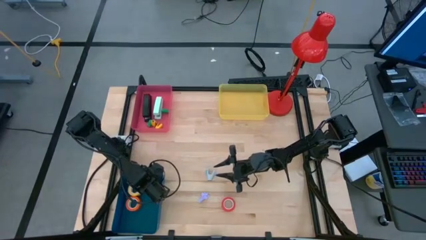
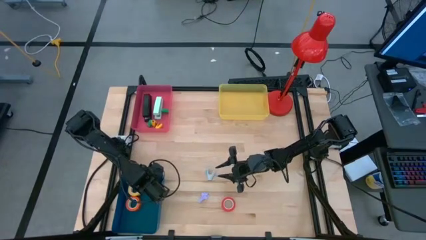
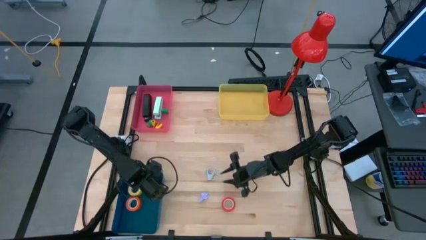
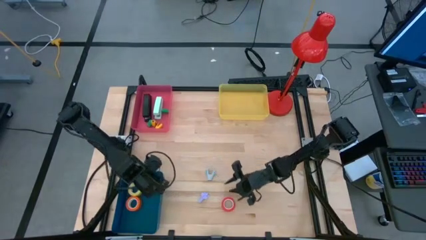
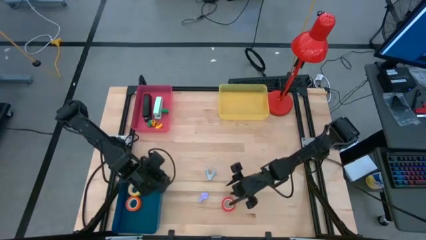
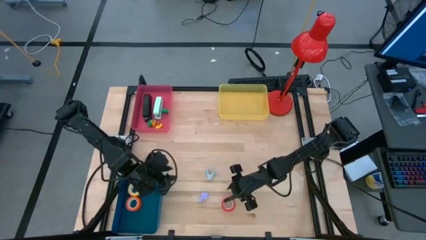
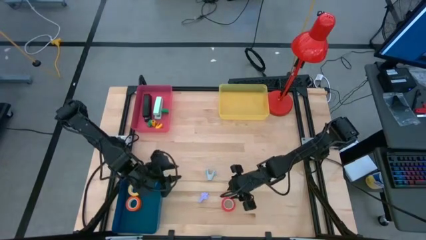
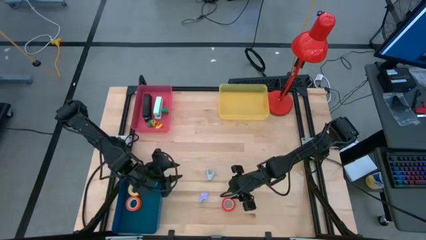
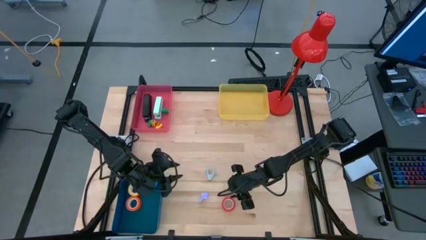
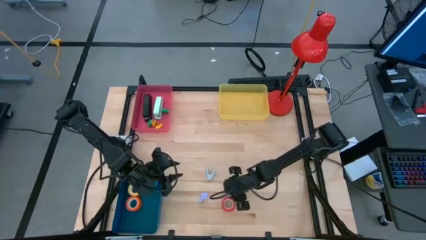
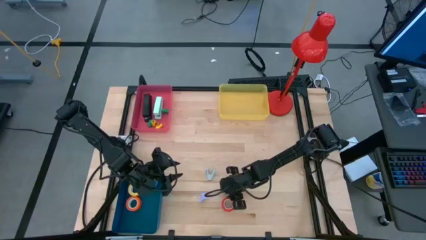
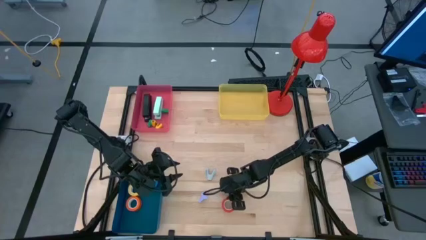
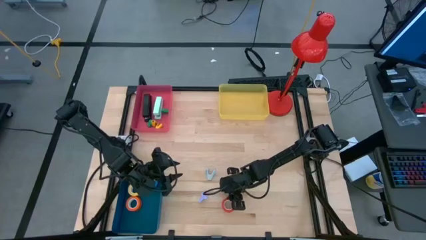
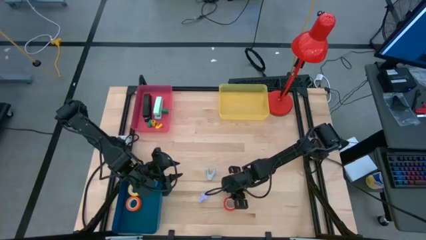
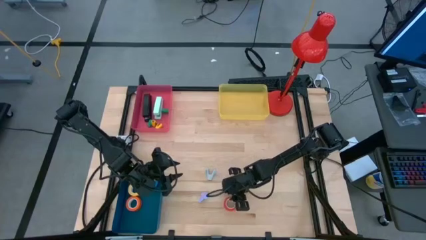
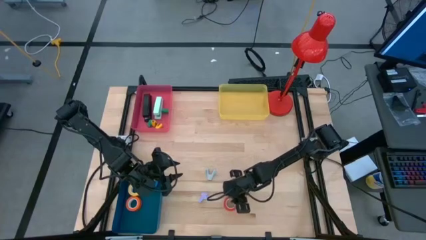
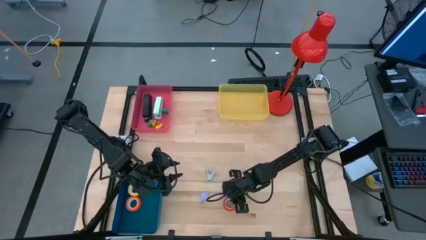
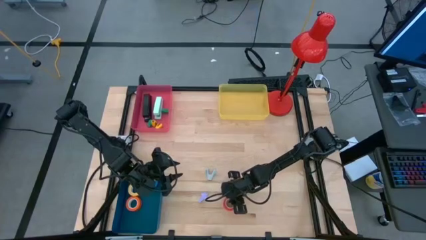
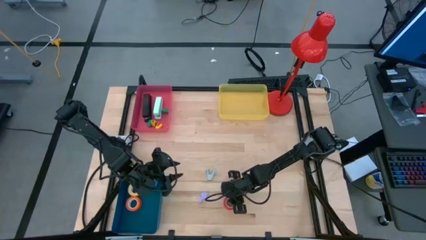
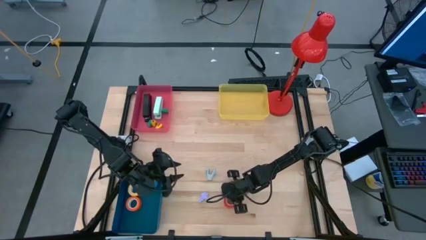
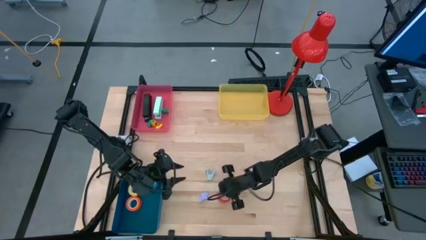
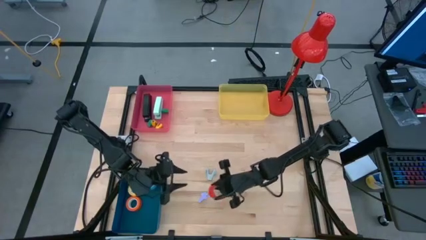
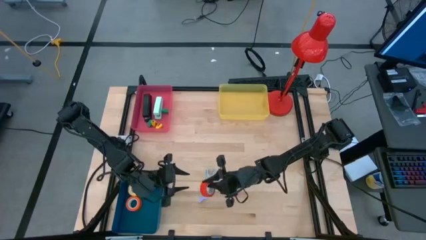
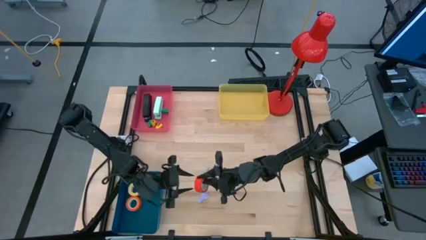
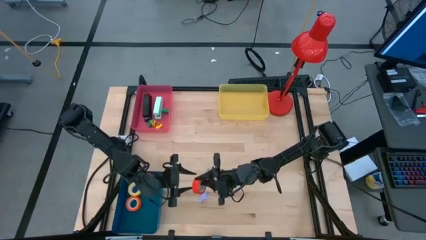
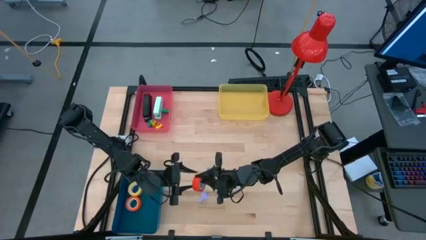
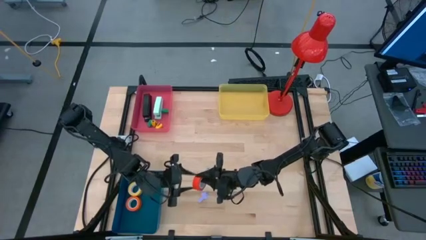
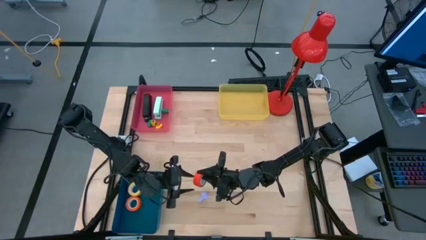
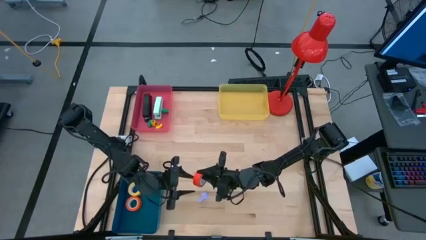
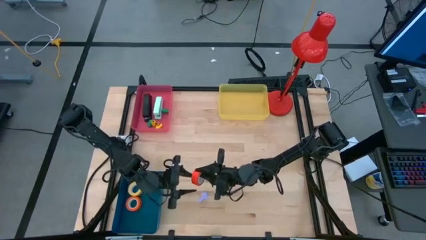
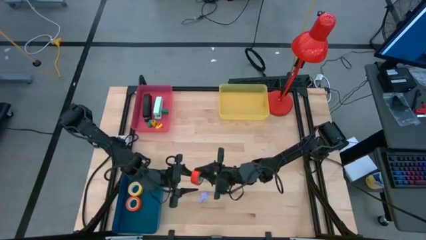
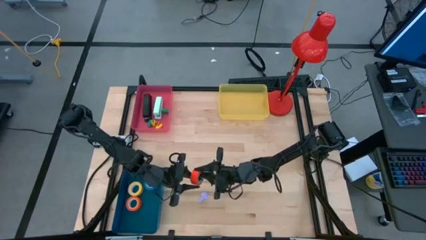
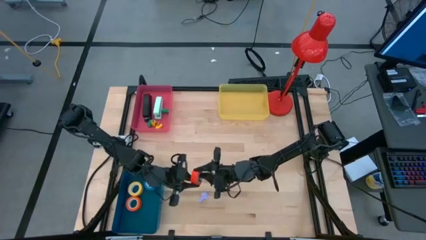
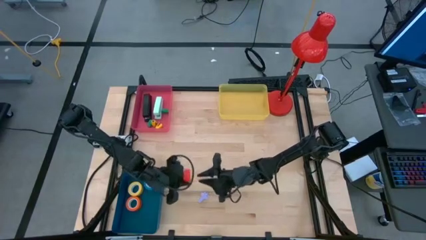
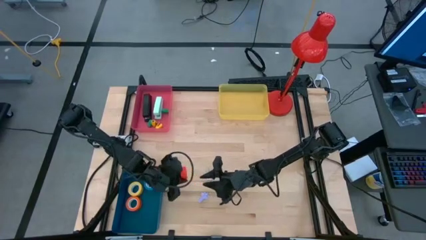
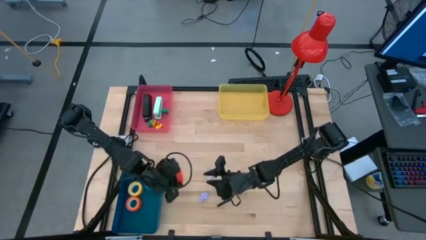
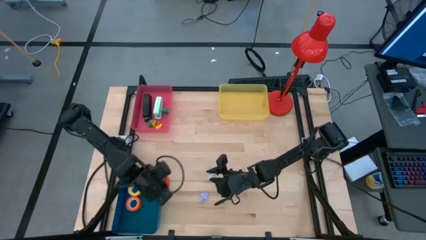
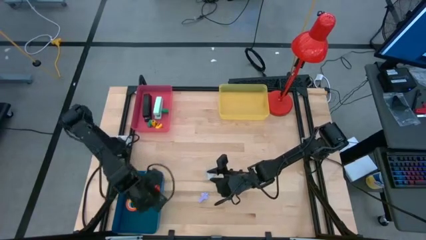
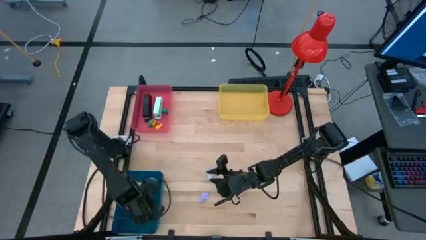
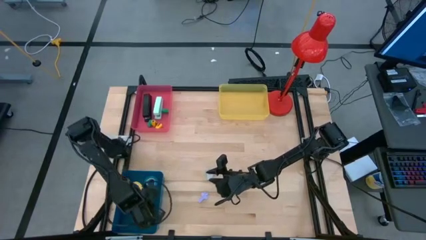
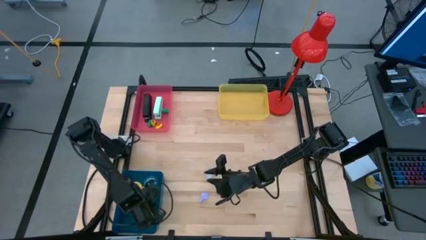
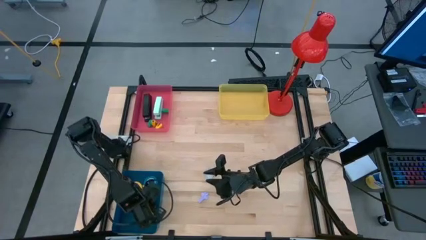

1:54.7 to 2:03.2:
Task: Pick and place Stapler, Stapler remover, tape
Put the red tape into the blue bin

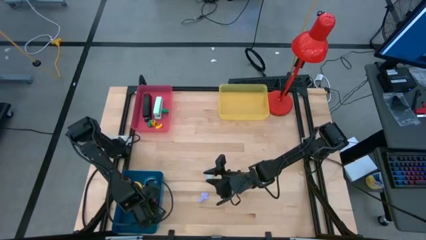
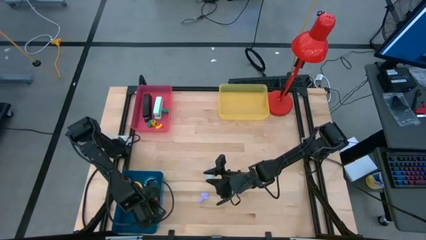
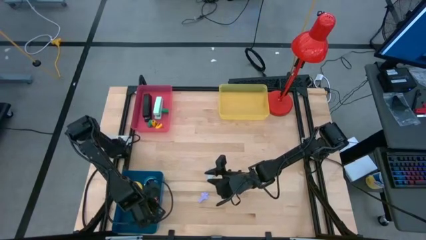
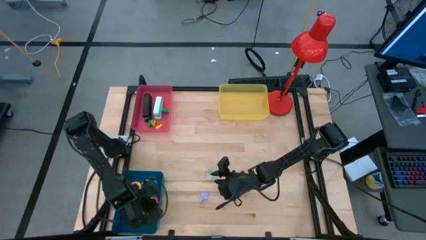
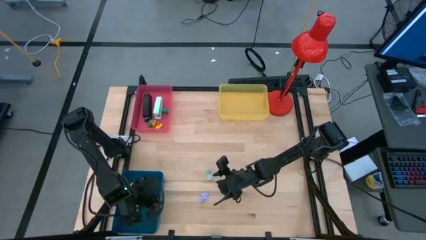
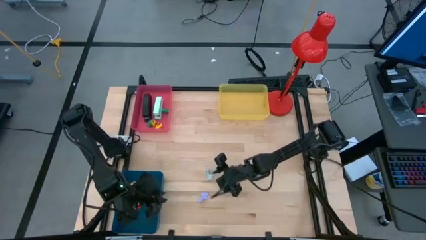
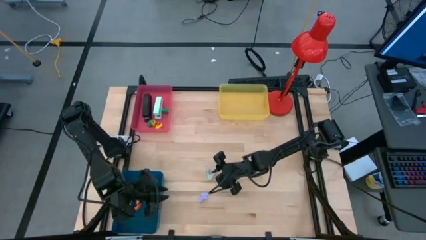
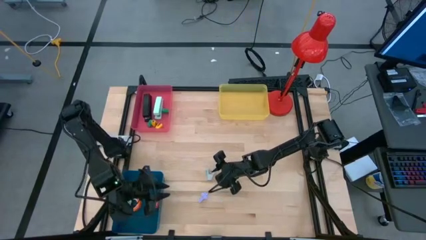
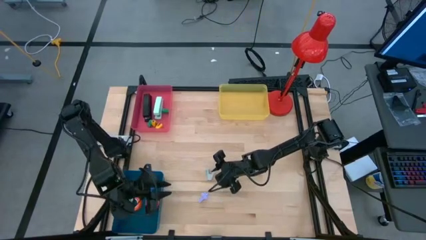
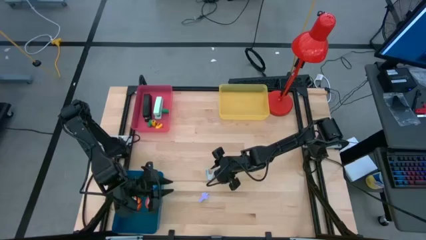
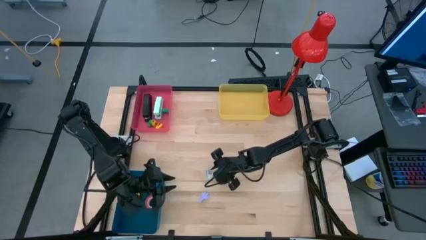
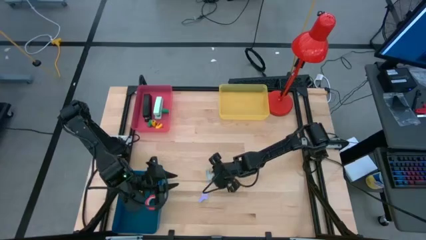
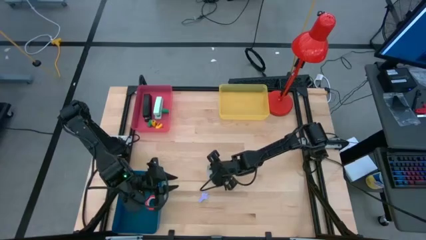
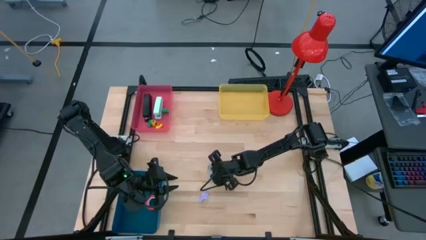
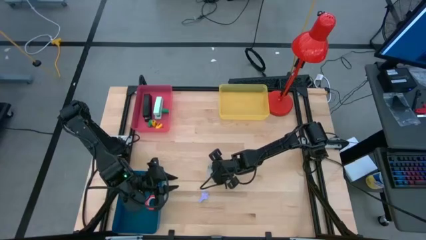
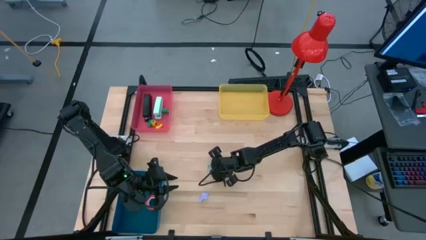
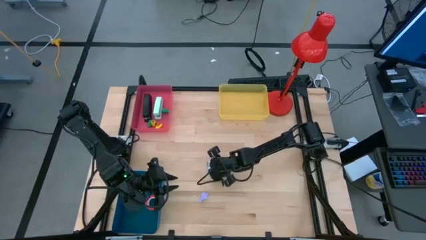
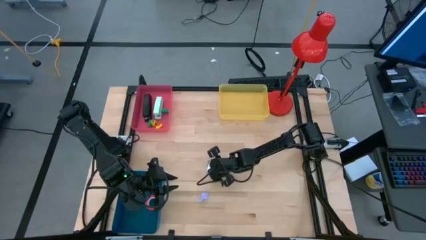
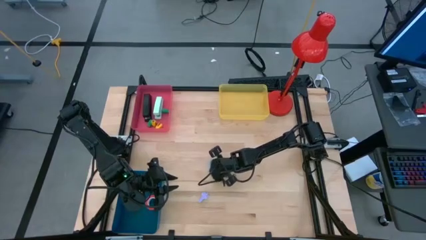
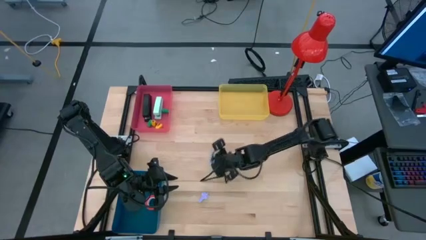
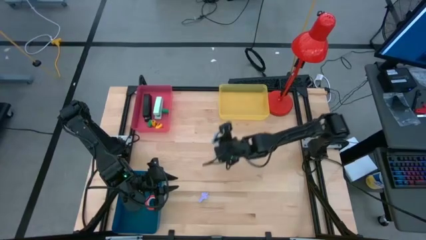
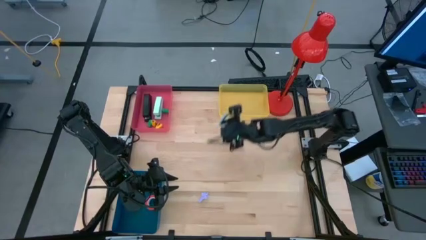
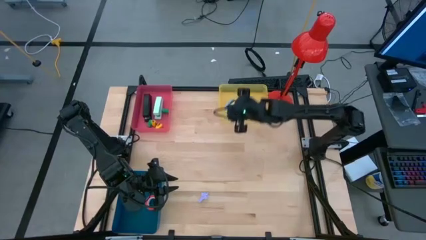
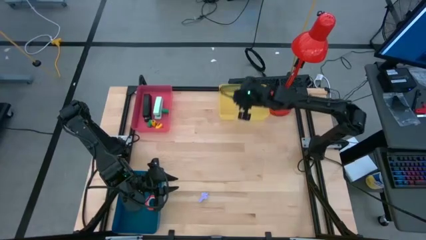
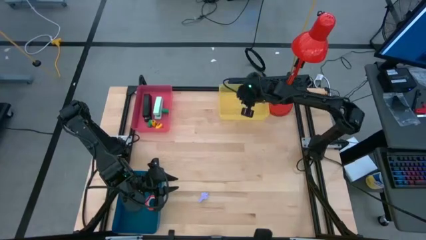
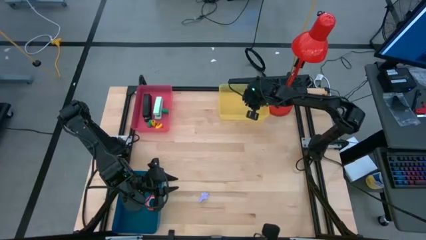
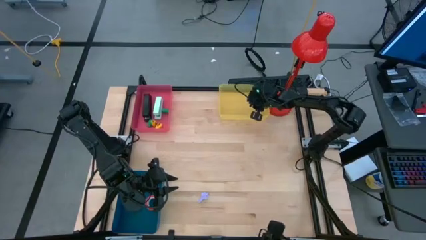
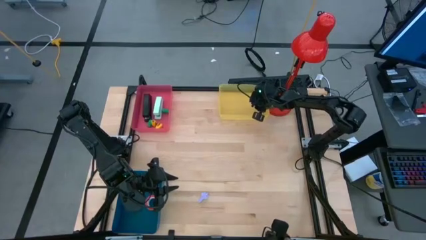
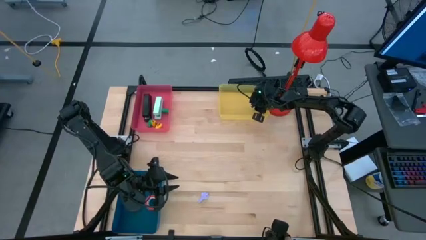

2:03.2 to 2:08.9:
Put the light blue staple remover into the yellow bin
